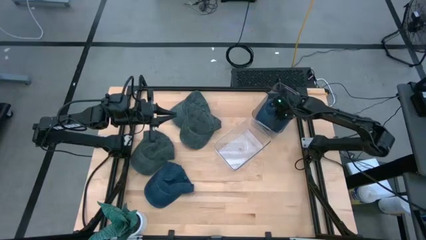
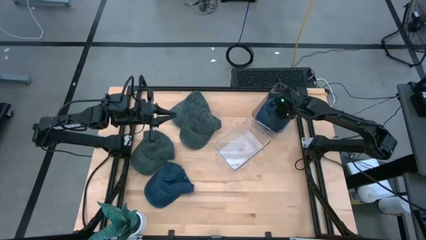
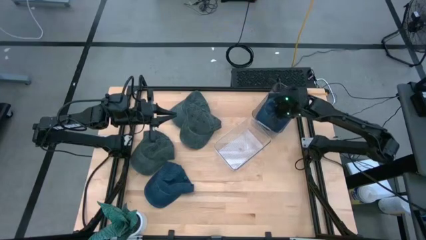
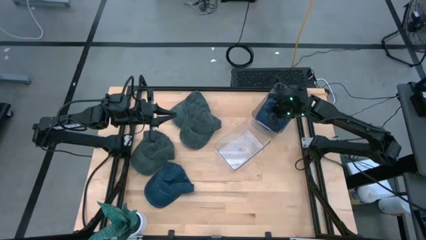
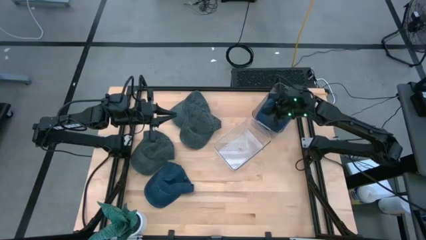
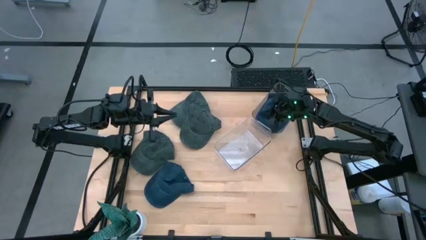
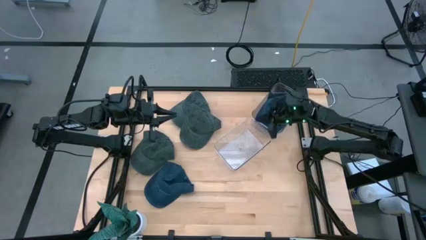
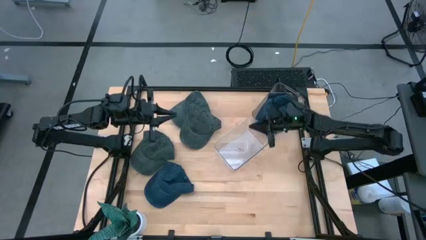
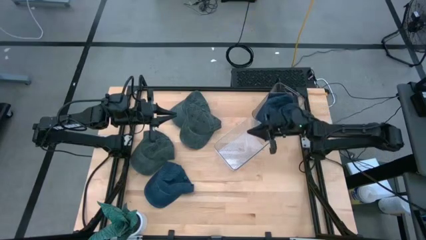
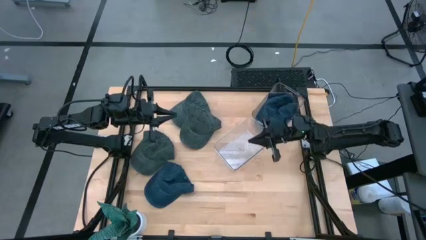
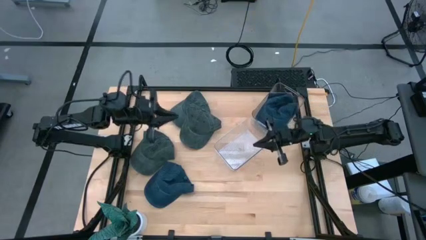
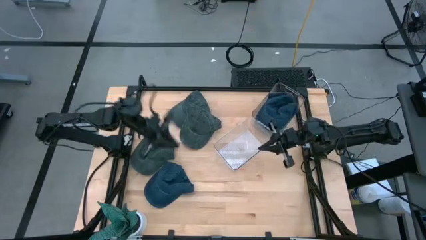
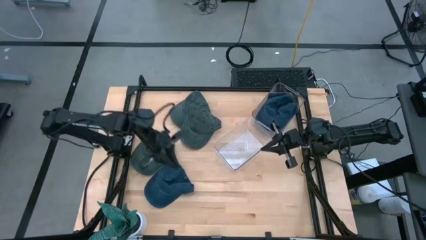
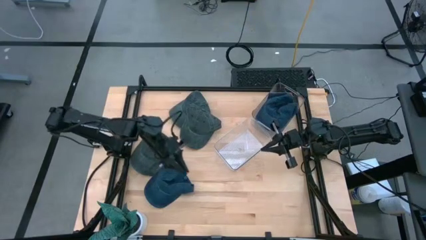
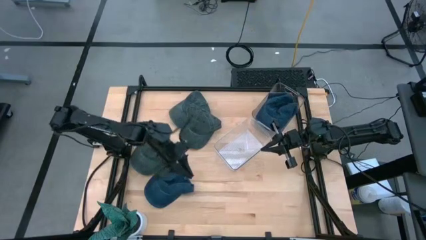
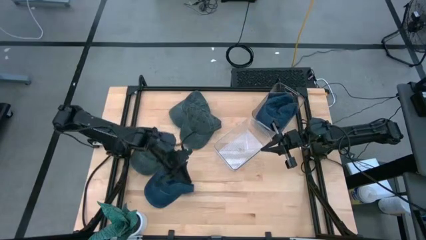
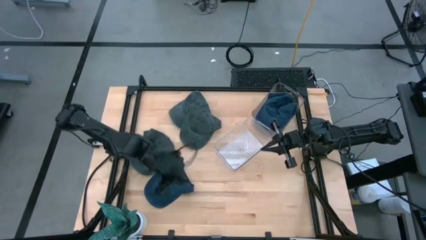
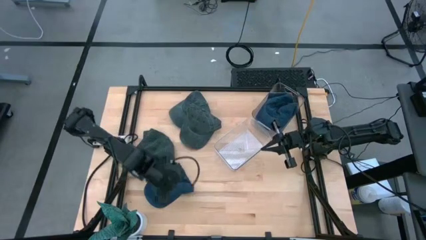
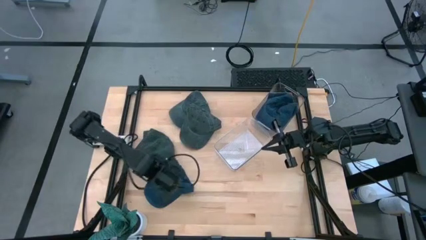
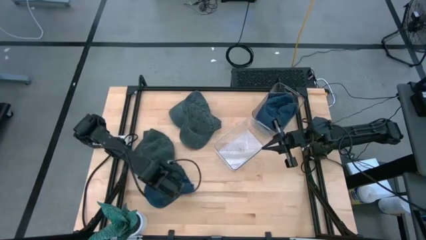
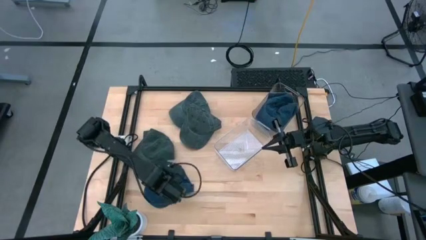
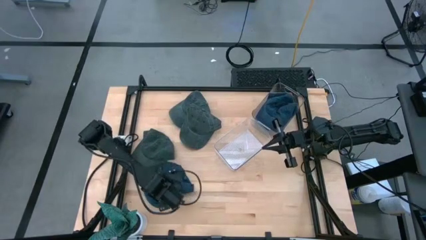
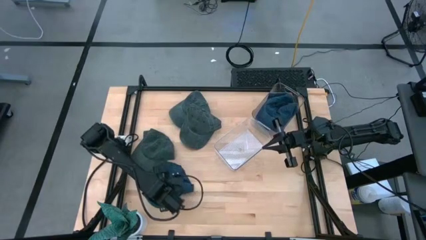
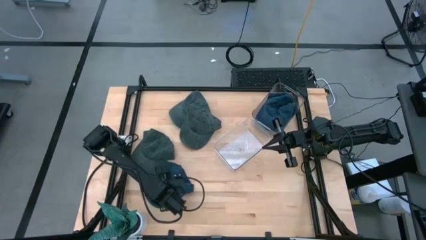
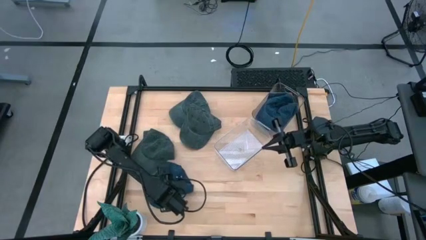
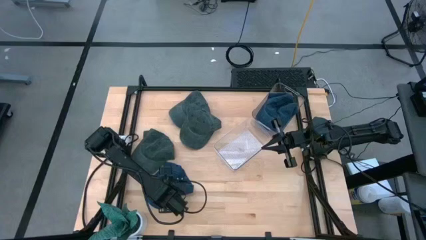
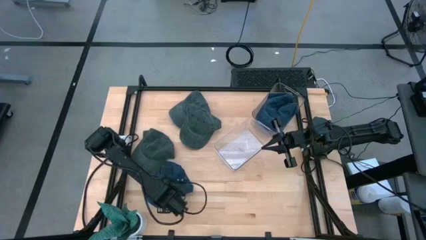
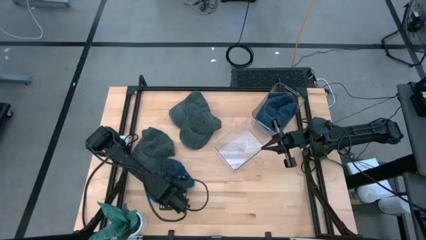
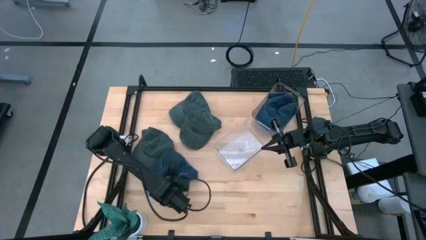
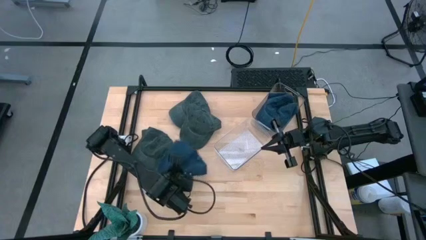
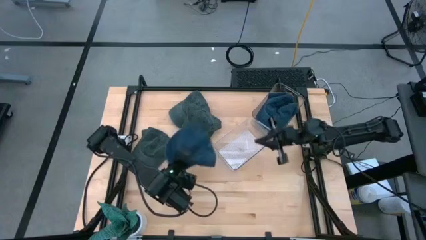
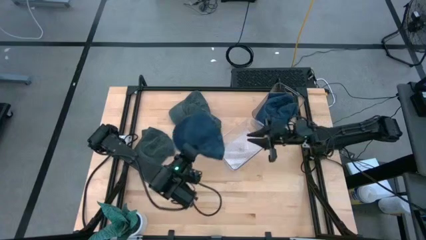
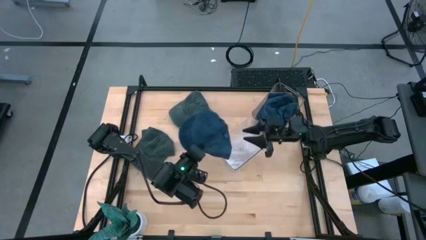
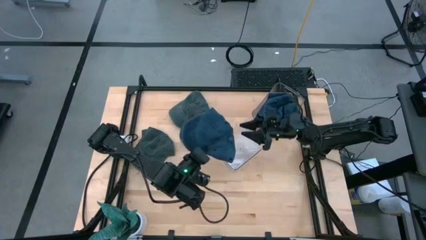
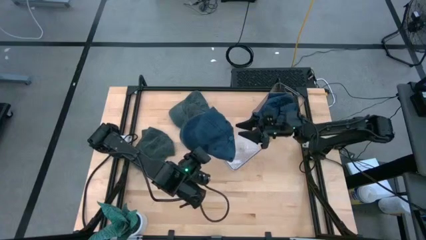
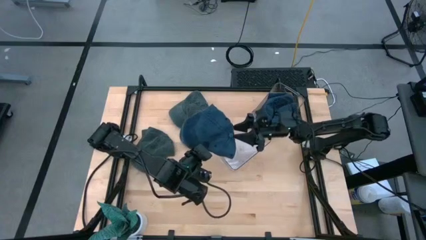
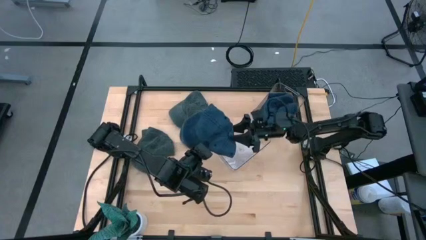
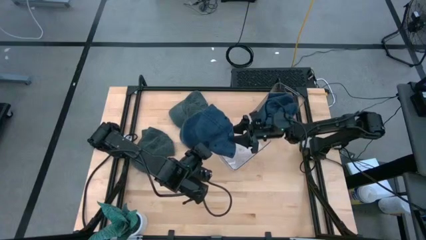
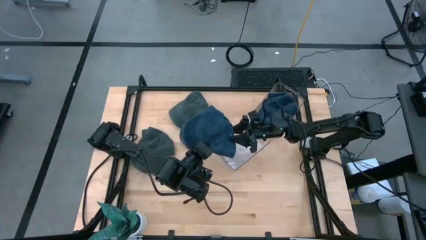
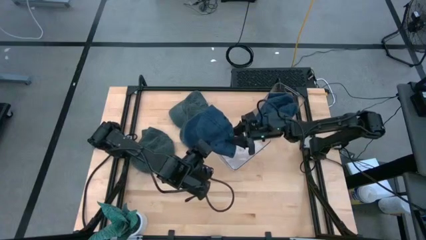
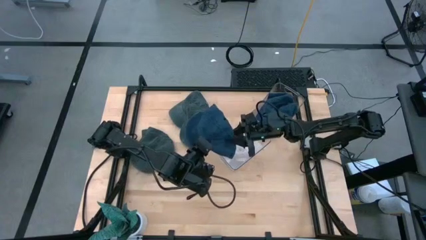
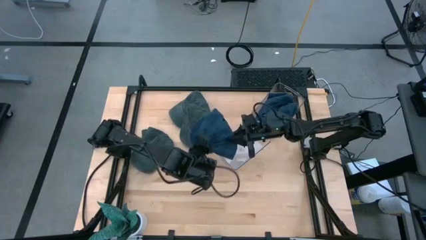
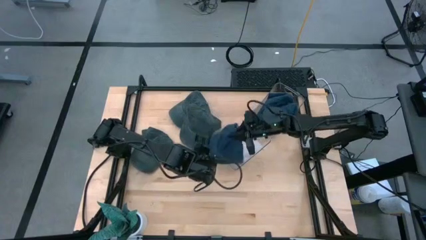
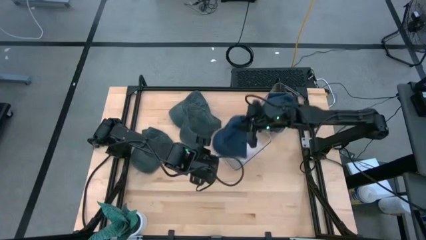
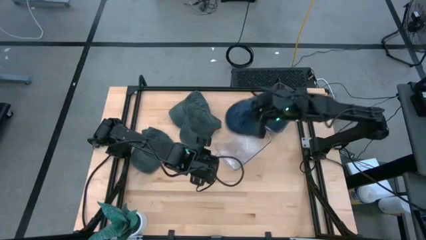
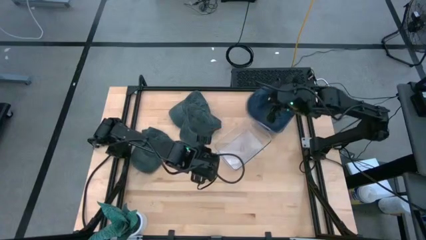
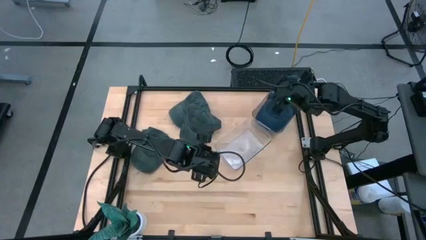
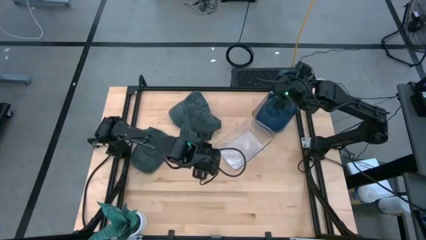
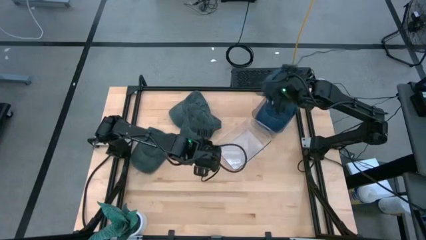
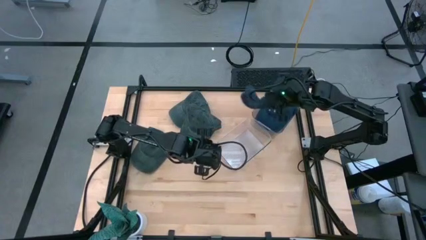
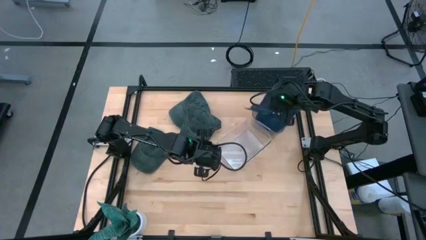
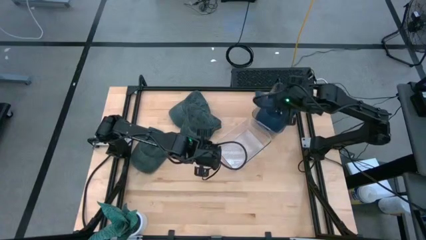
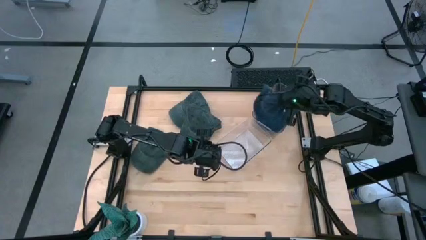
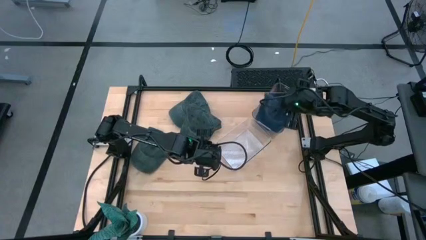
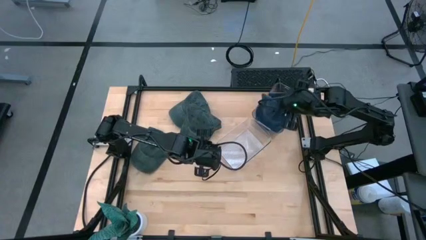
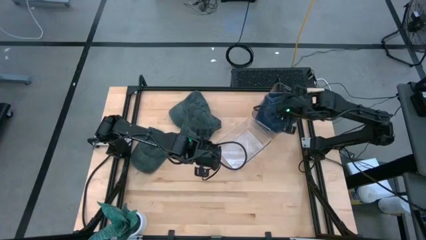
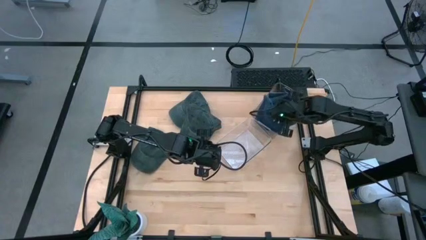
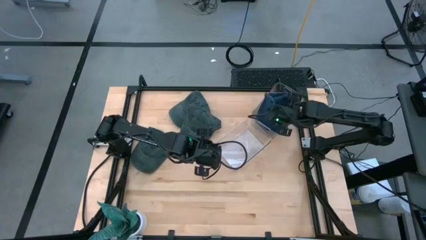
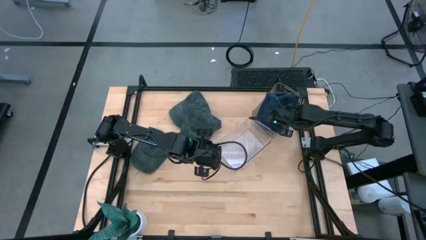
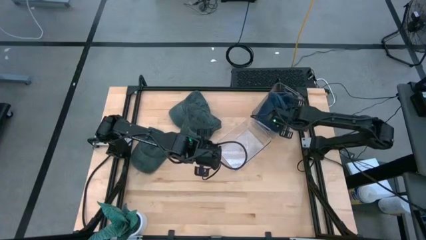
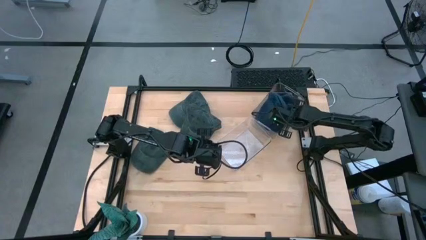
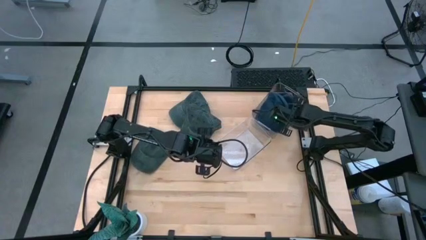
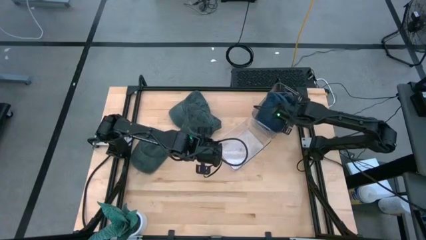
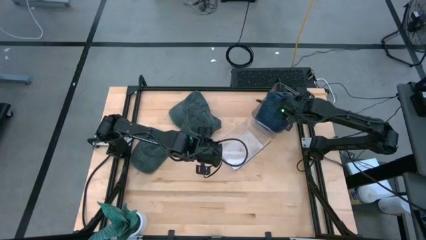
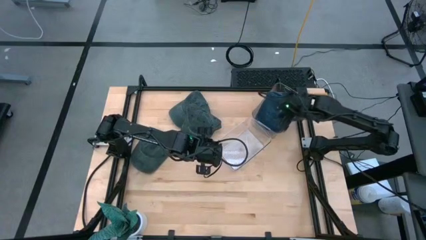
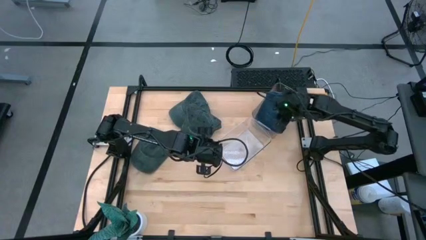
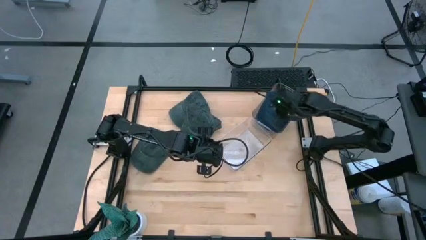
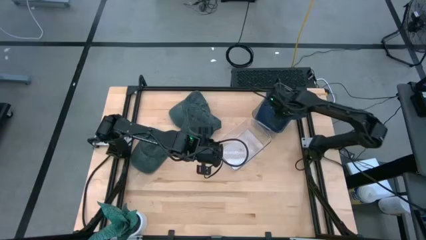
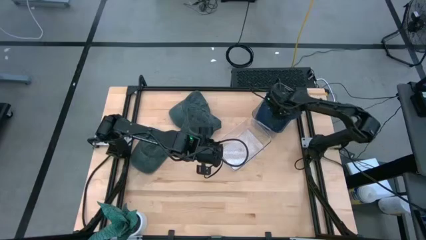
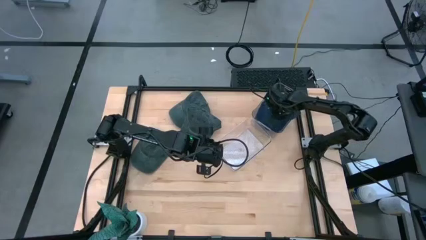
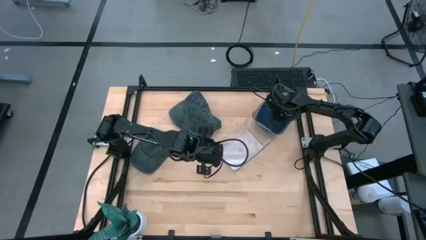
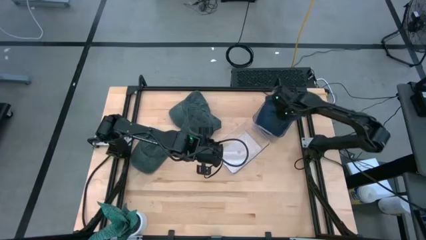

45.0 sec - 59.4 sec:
Task: Pick & Place hat
Put the blue cap into the top transparent bin
